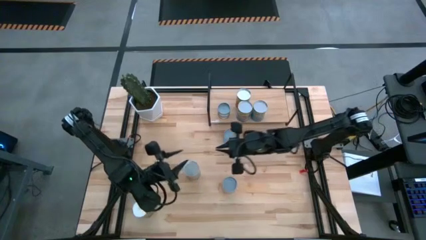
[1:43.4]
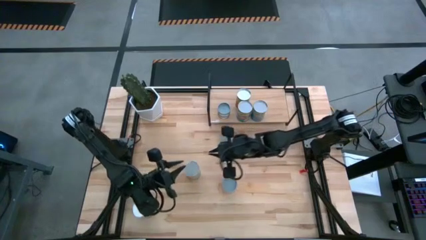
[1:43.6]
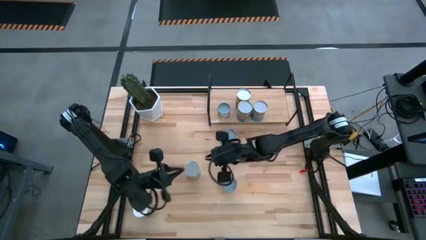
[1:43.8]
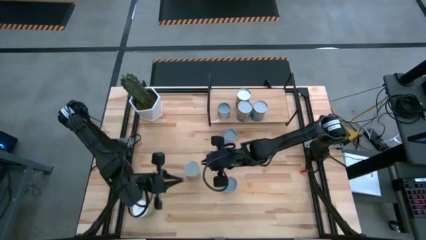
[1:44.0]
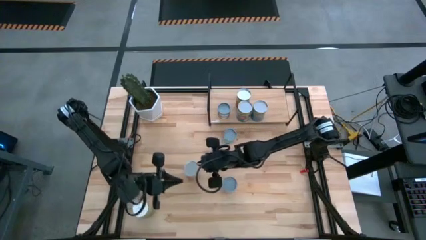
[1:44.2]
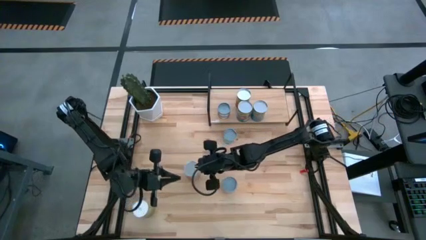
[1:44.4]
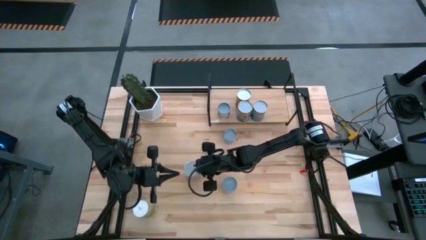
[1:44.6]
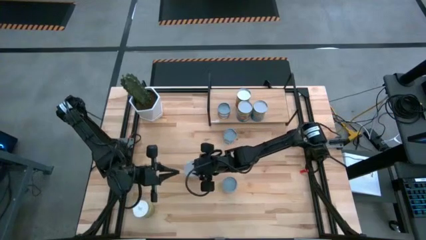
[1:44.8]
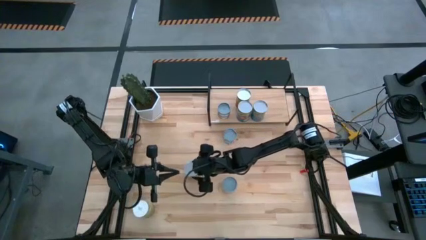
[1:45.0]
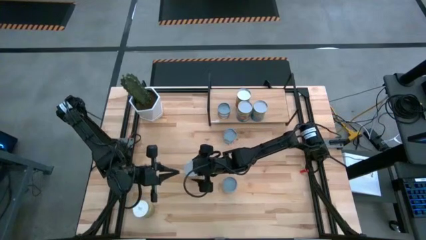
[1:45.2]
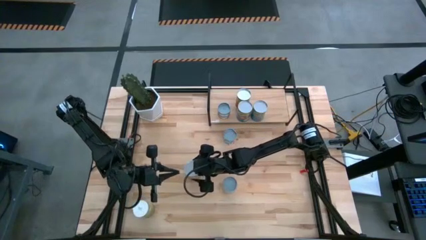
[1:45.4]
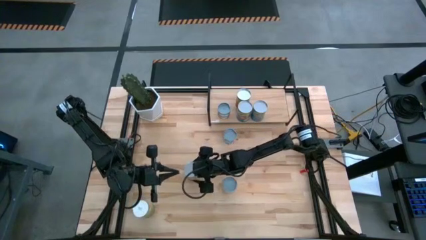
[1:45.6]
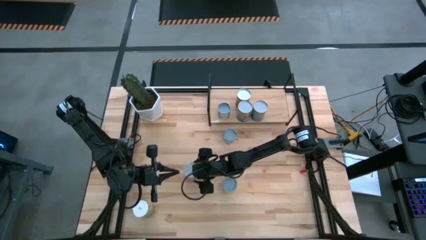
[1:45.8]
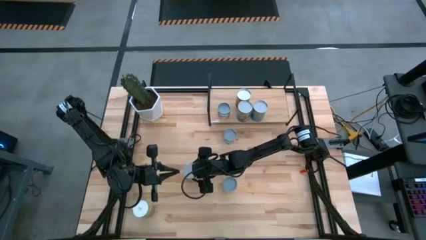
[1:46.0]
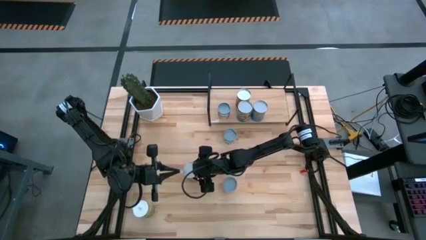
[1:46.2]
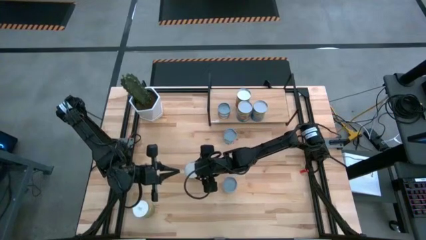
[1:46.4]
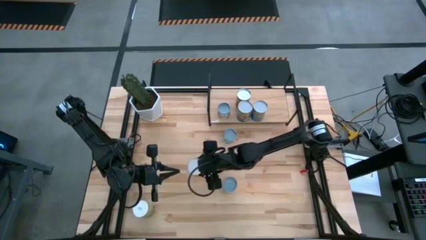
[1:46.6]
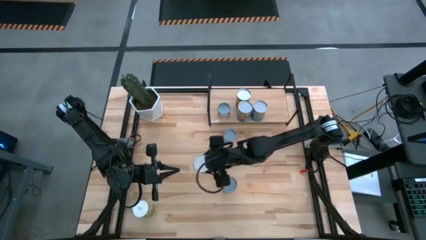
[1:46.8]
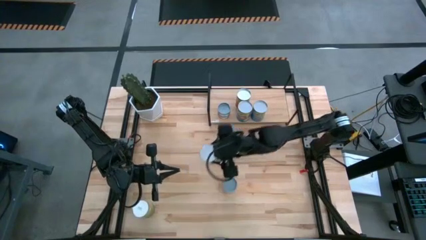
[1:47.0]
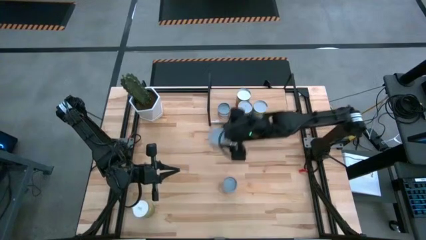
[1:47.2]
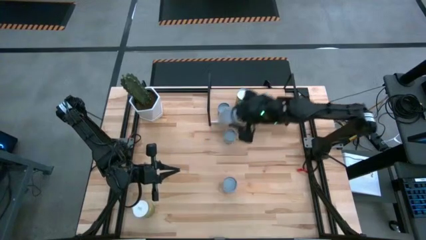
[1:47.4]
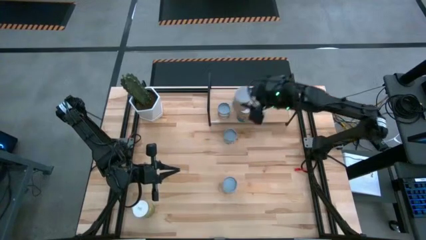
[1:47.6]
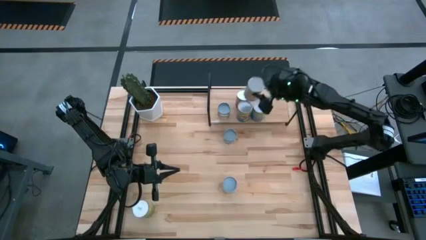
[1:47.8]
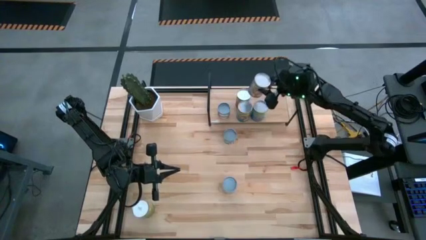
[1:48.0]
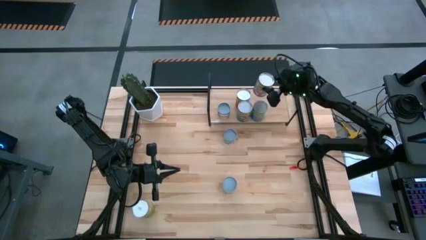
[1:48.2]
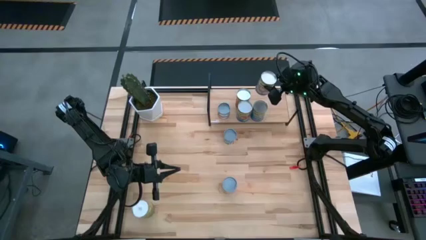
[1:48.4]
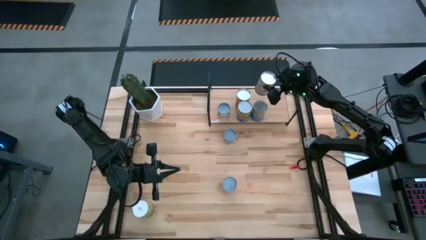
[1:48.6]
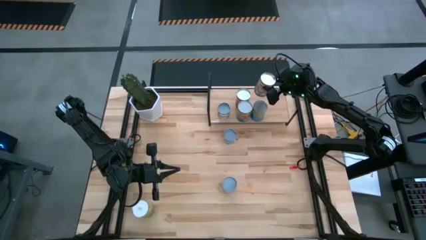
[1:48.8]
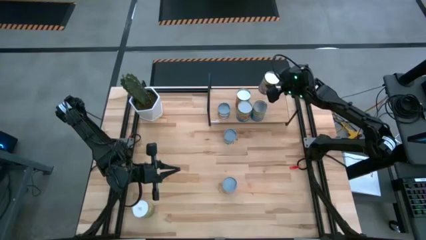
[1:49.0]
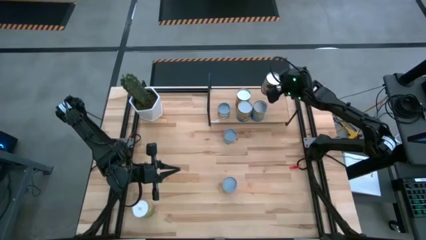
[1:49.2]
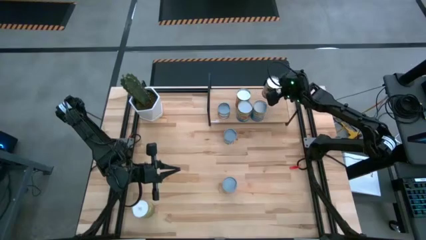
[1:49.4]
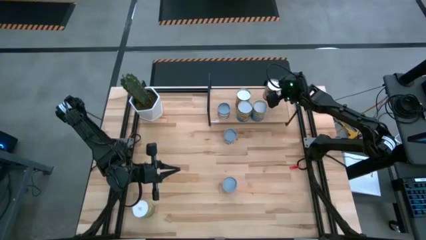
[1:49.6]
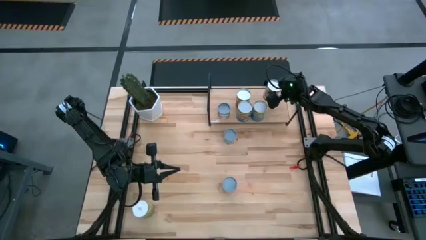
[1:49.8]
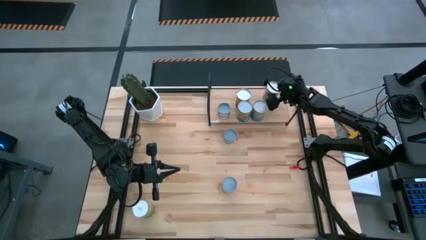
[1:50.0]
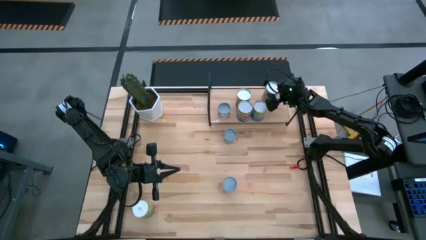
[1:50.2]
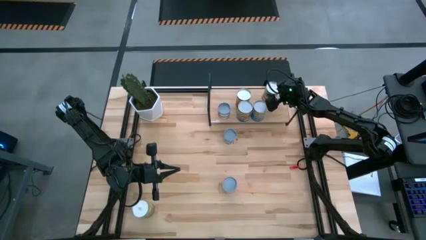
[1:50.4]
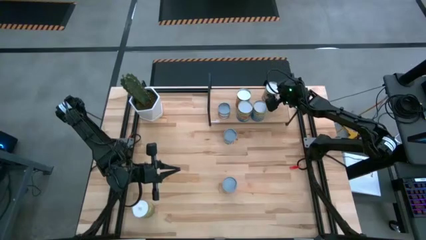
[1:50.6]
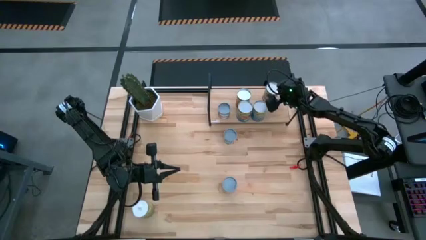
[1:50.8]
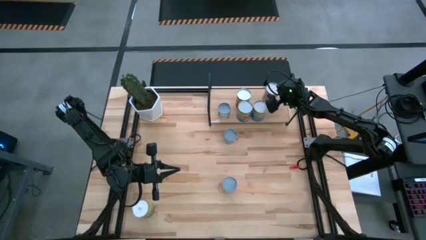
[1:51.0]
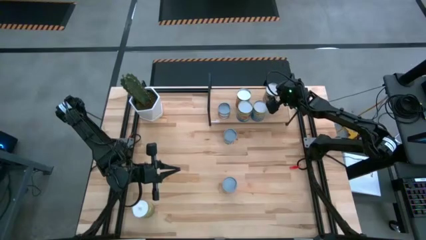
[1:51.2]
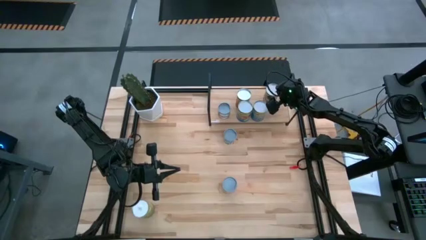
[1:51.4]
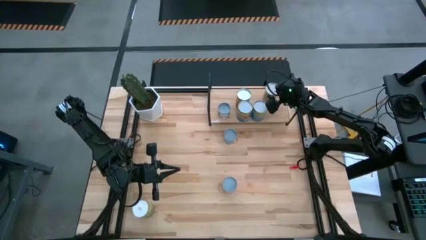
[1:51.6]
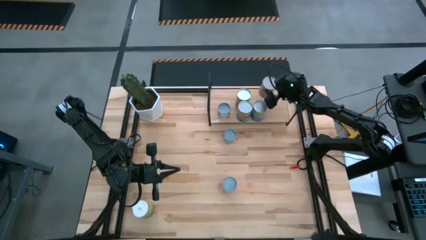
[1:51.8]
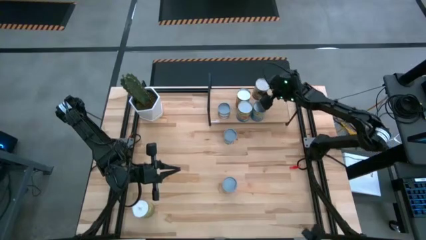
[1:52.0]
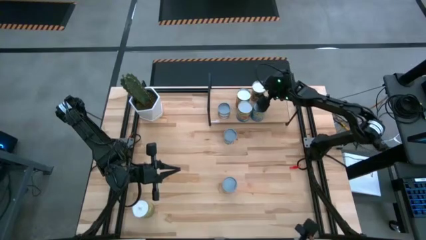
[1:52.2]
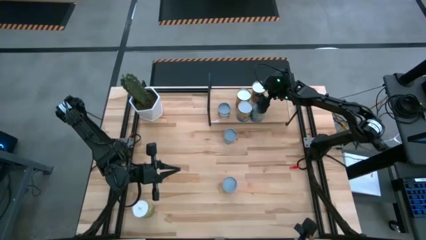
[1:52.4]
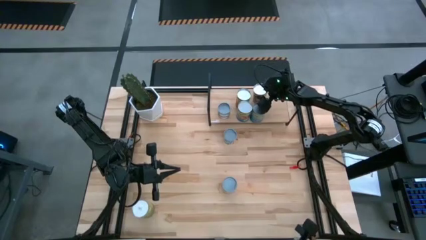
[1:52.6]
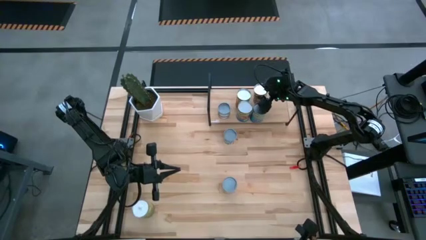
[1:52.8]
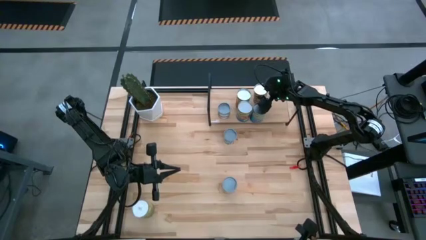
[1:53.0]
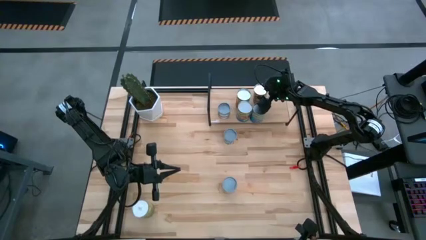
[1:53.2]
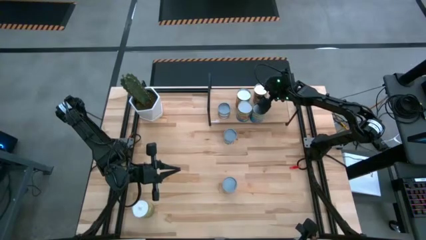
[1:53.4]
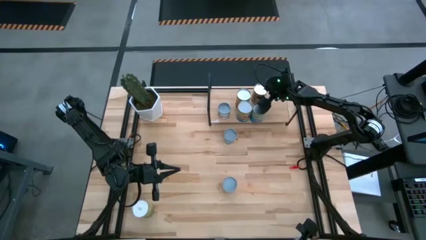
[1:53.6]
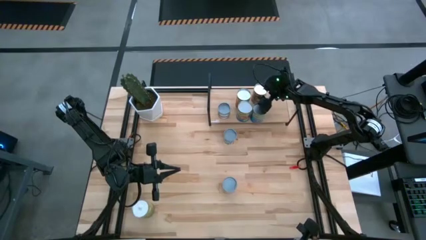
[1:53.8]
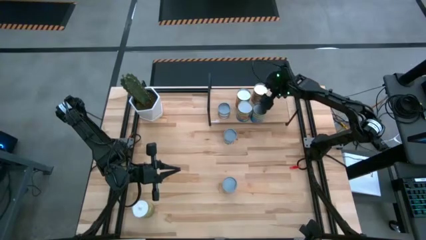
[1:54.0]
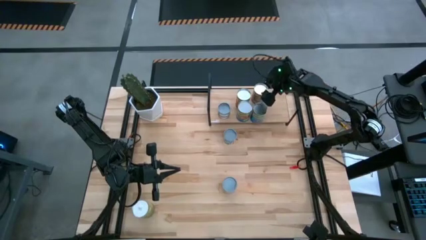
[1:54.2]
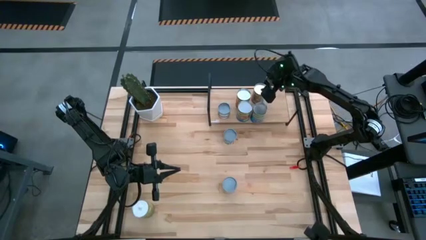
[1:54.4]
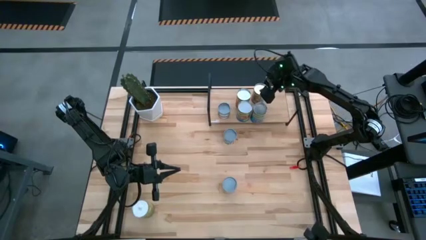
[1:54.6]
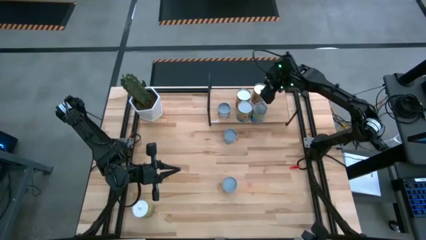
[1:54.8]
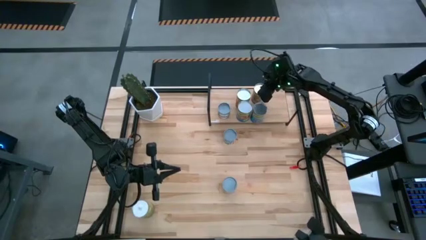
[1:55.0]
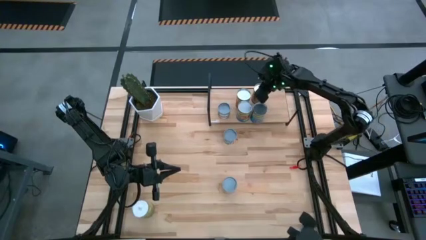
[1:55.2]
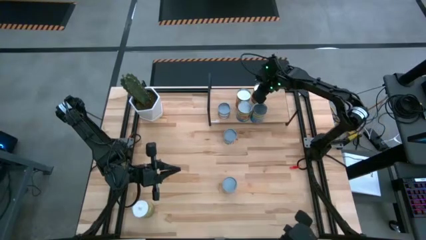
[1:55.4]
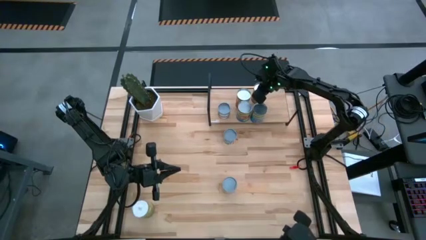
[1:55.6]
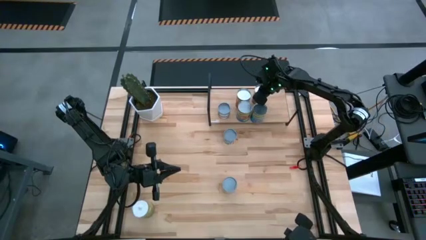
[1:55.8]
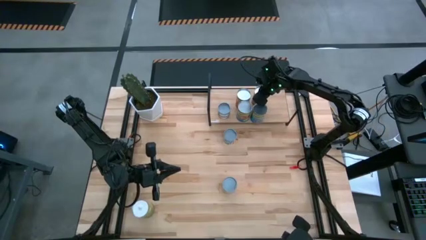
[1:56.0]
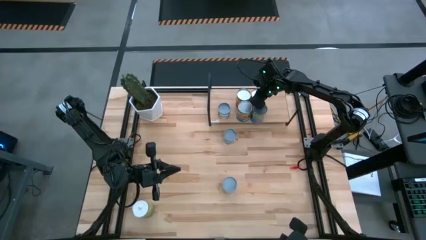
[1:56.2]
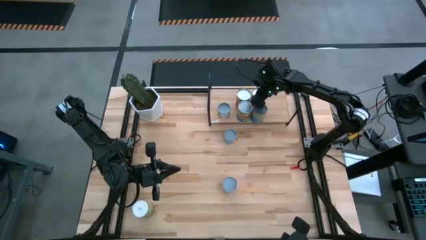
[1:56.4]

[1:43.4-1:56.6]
Task: Pick and place cans onto a shelf
Put the canned peaches on the shelf
